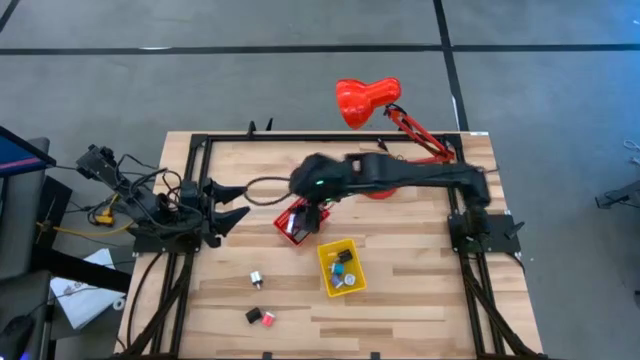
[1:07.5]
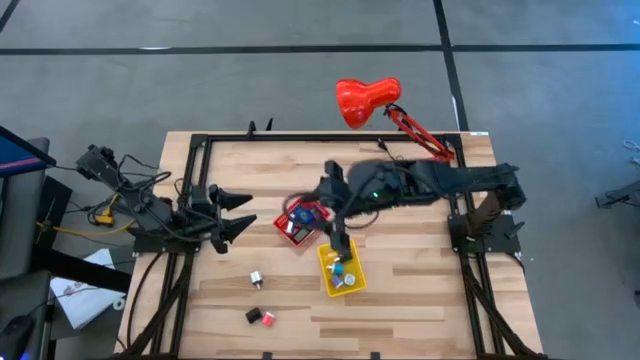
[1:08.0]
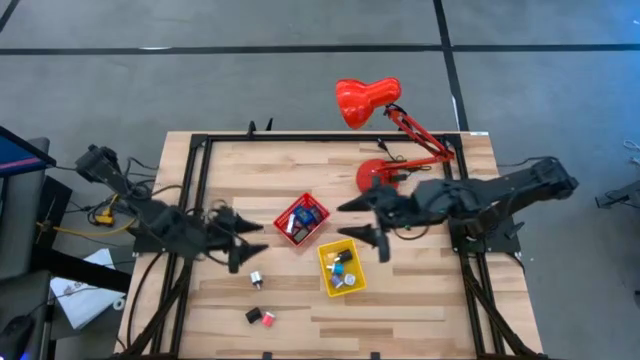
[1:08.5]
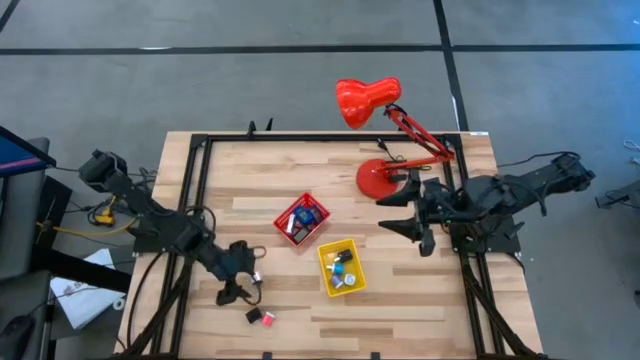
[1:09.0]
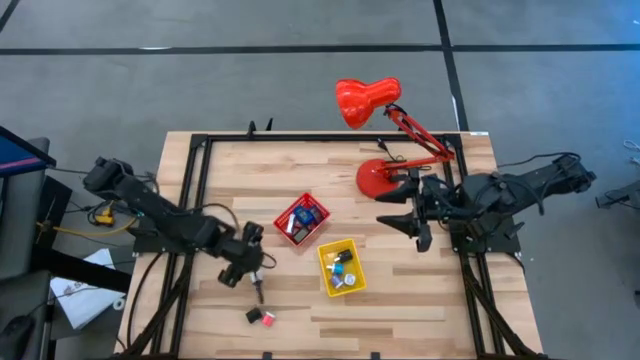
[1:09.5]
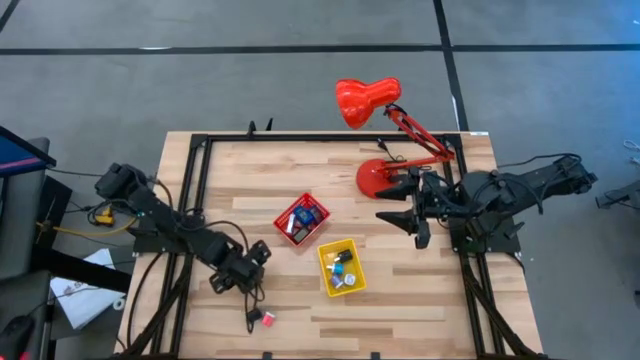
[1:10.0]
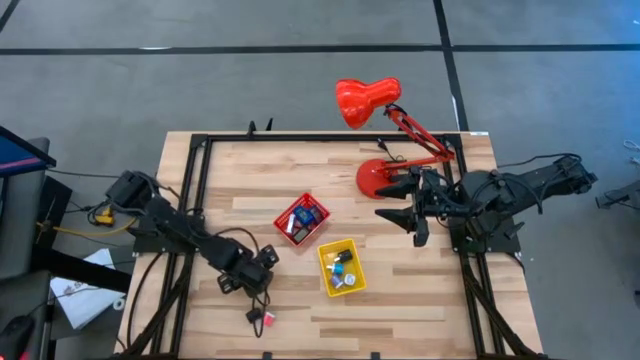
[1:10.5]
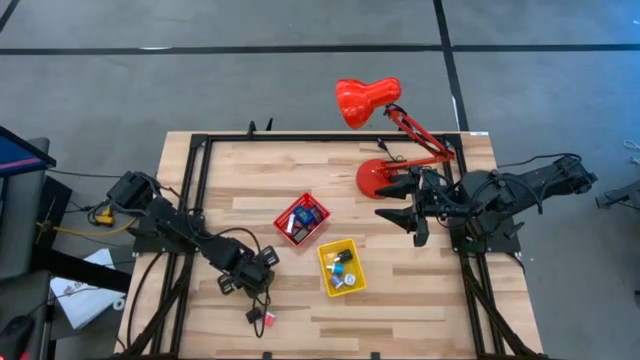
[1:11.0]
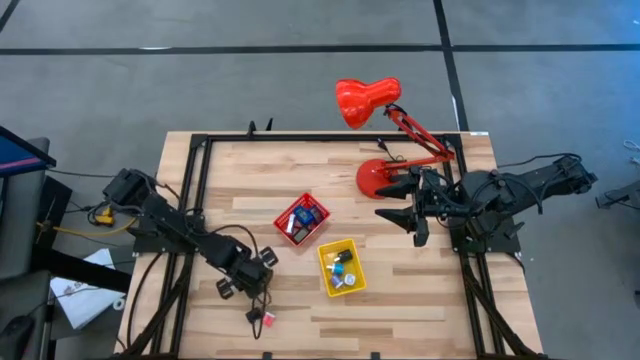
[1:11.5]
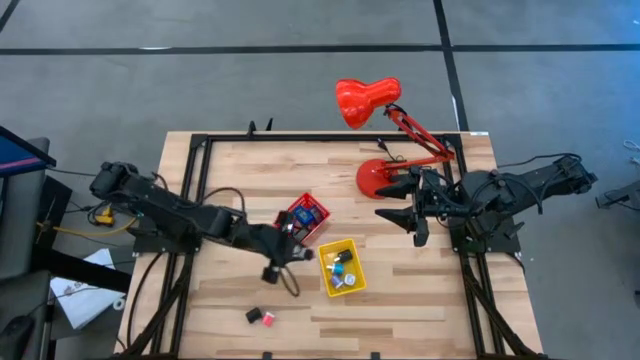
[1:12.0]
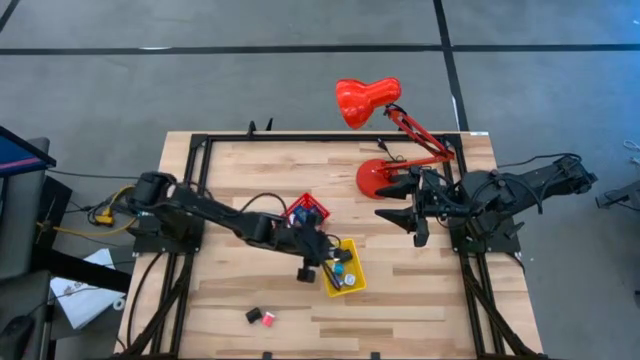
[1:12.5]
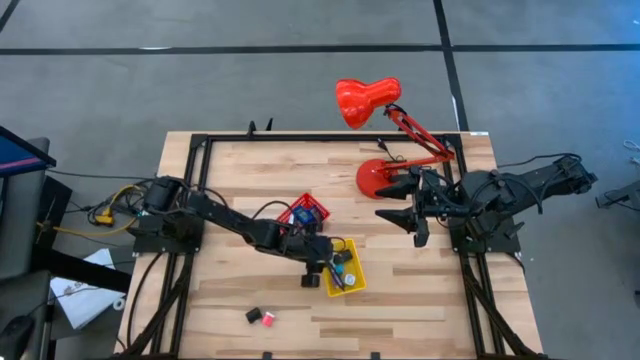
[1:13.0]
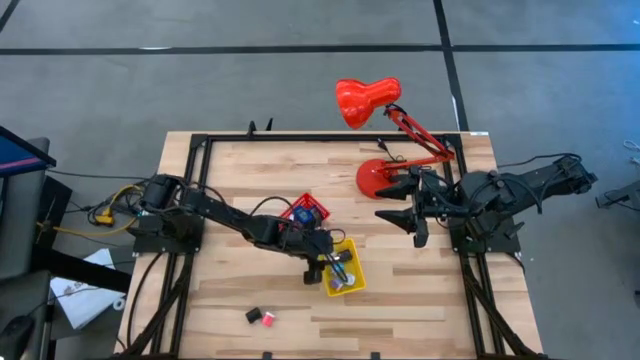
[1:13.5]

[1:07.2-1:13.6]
Task: Pick & Place Office items
Put the white charger adapter into the yellow basket

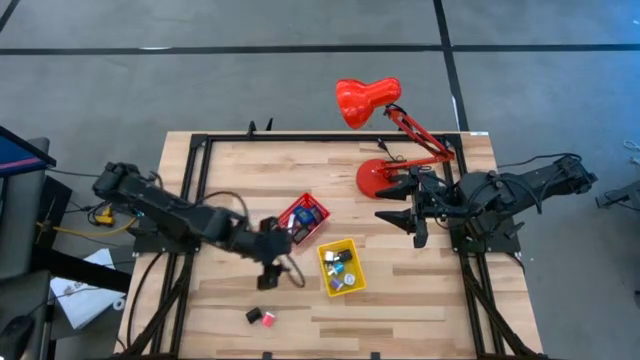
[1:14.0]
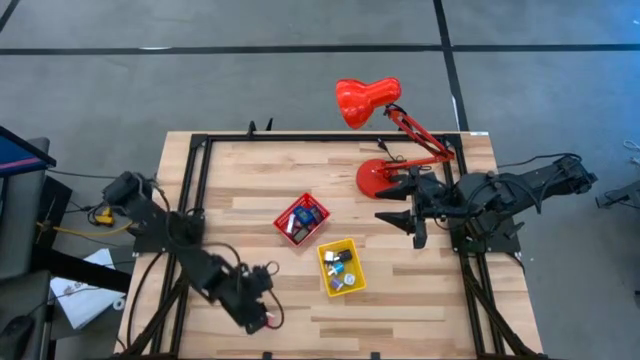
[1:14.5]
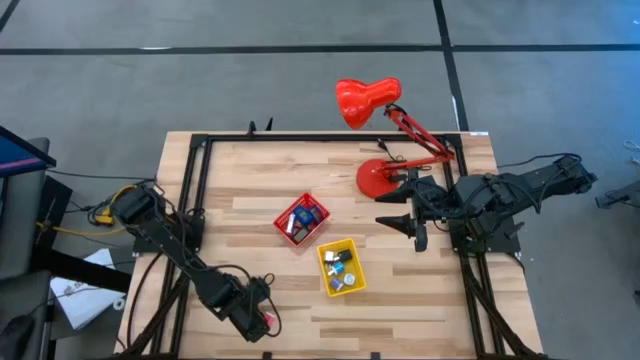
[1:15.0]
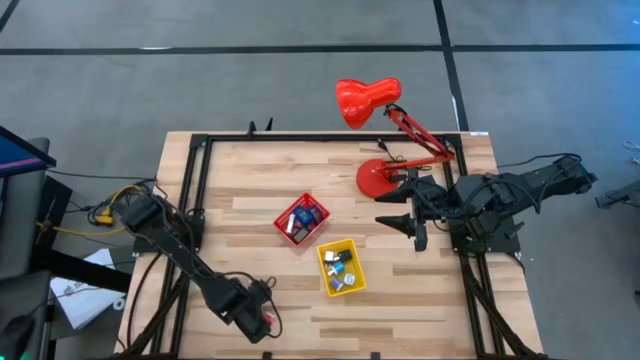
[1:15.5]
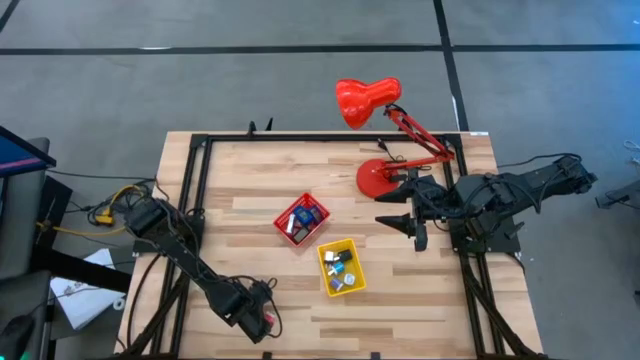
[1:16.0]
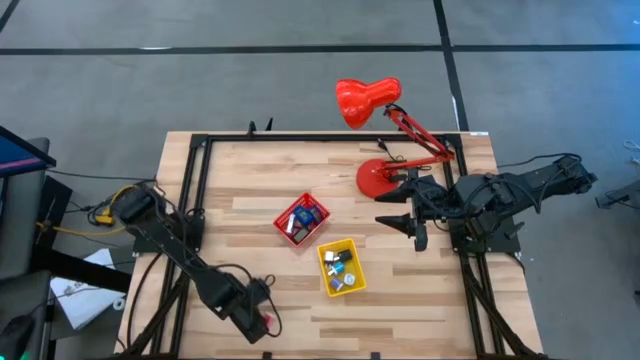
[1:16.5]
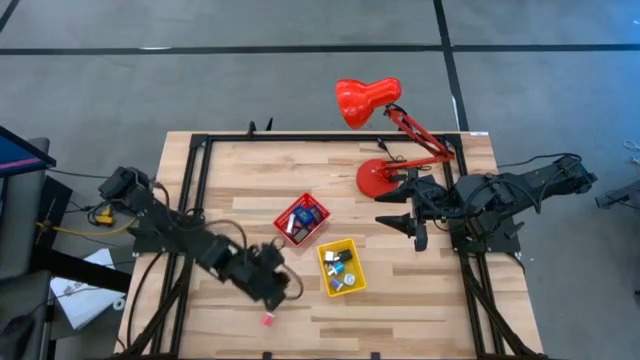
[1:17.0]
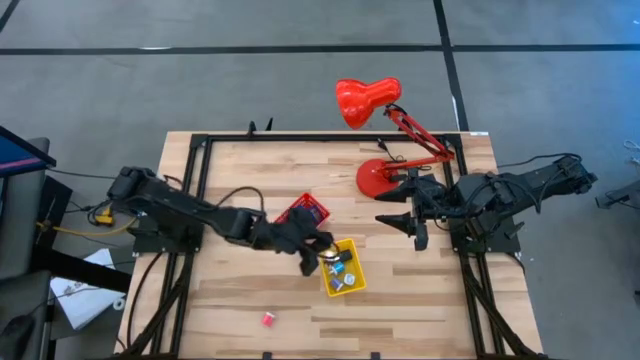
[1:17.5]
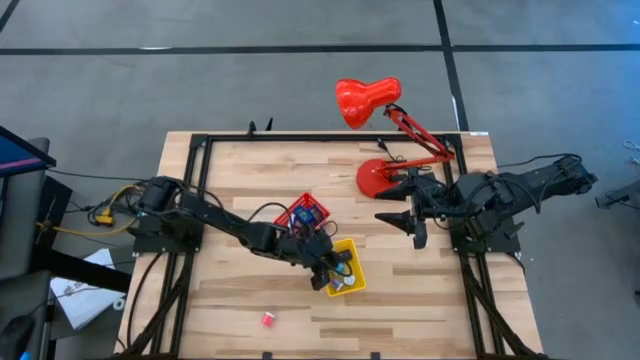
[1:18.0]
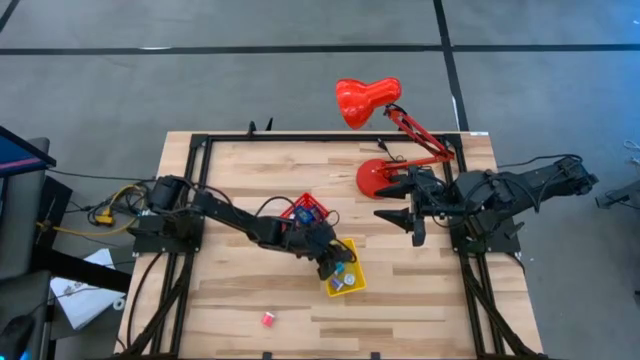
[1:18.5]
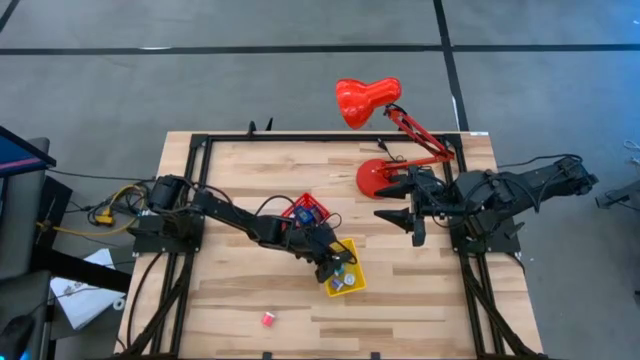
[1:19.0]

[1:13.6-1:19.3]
Put the black charger adapter into the yellow basket

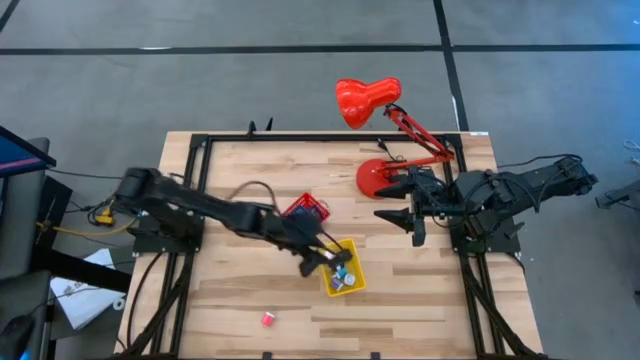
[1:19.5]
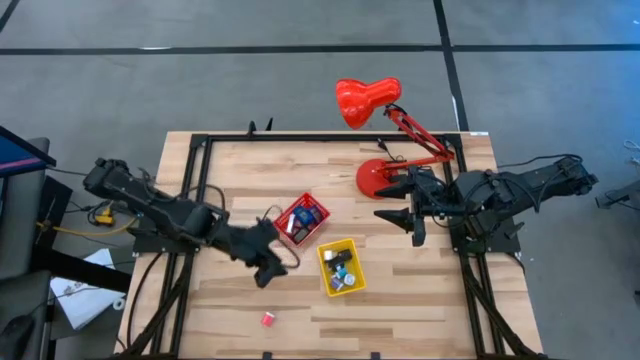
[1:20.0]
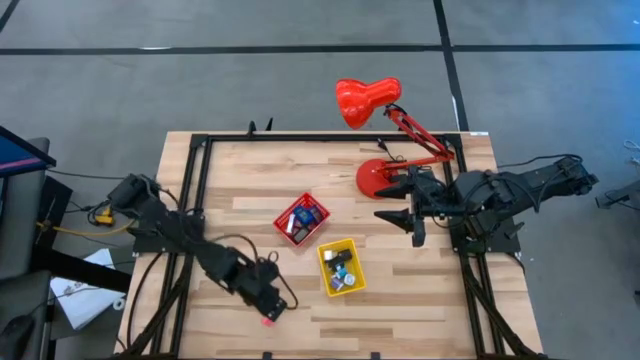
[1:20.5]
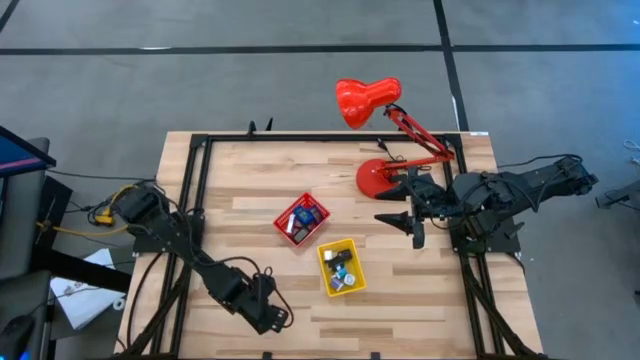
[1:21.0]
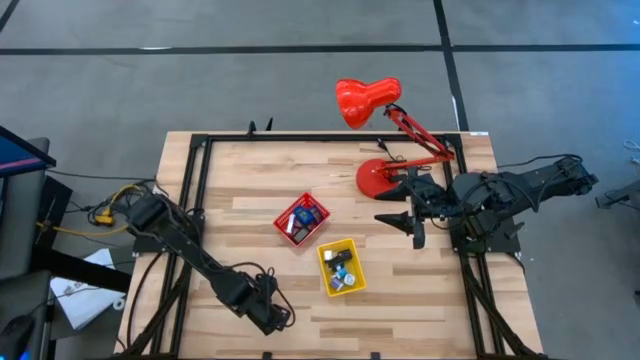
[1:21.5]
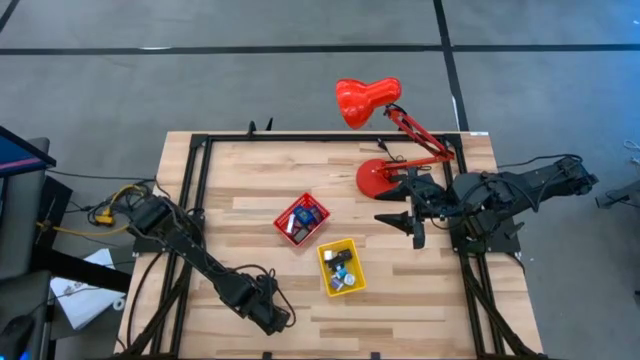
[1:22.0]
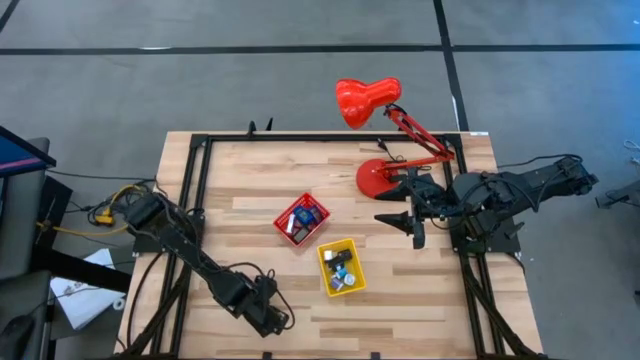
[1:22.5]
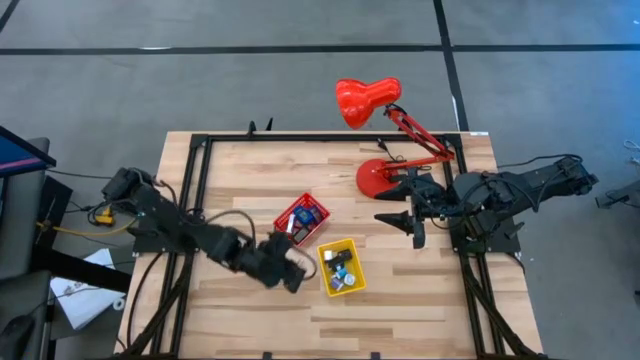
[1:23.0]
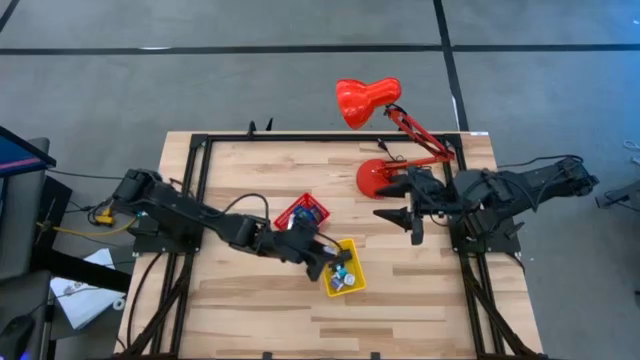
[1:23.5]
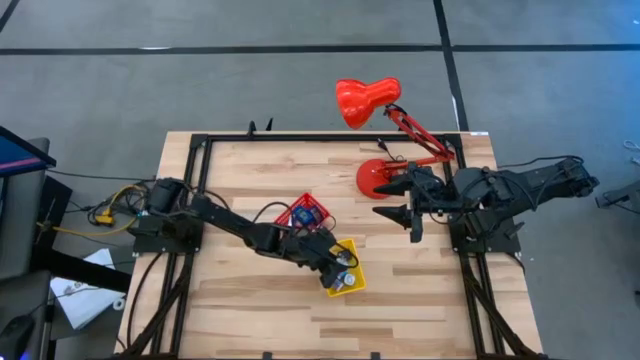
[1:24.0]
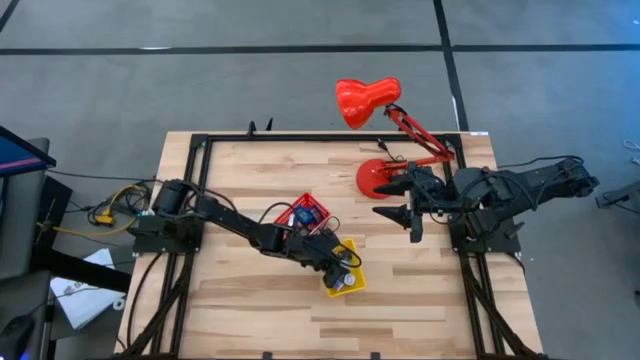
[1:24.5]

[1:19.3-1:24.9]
Put the pink charger adapter into the yellow basket

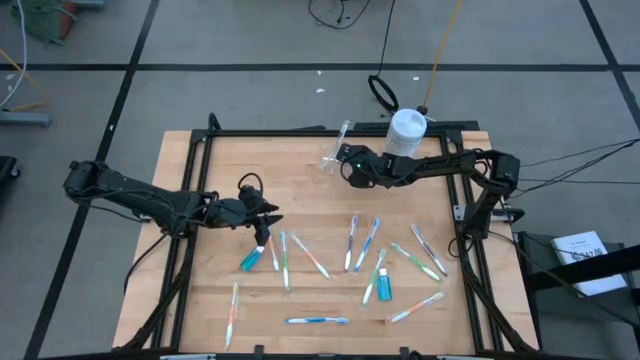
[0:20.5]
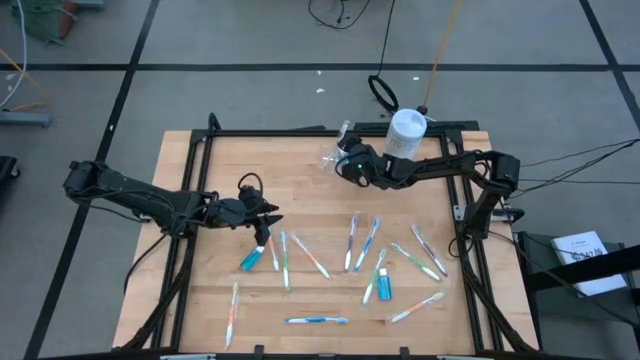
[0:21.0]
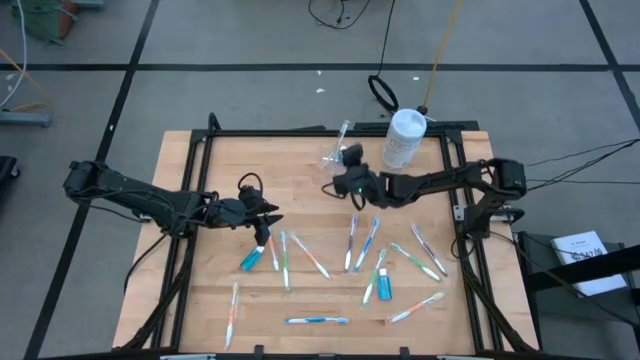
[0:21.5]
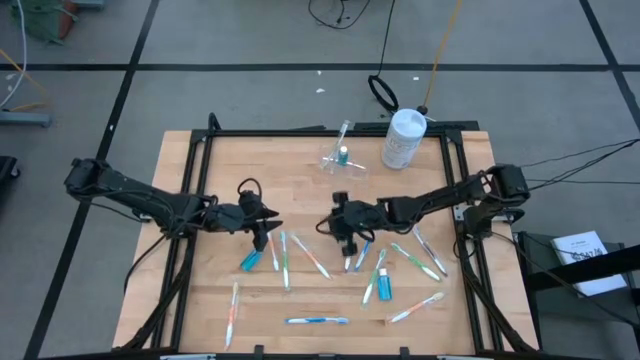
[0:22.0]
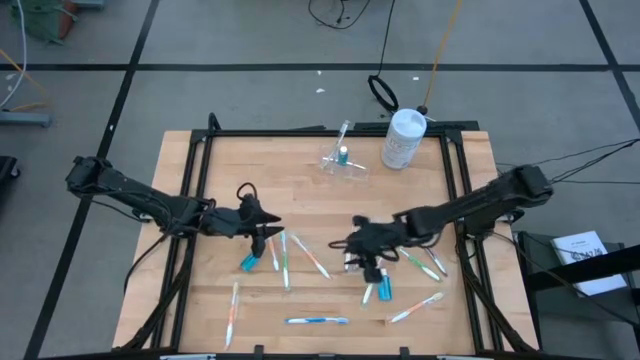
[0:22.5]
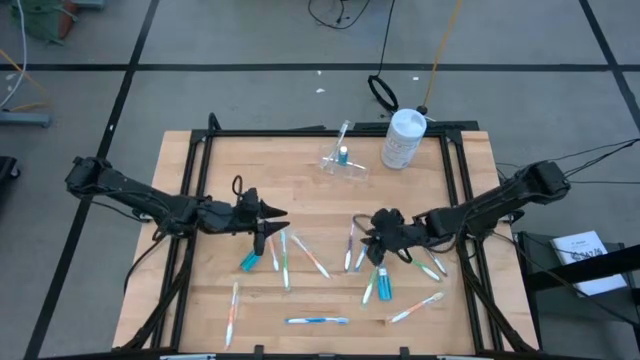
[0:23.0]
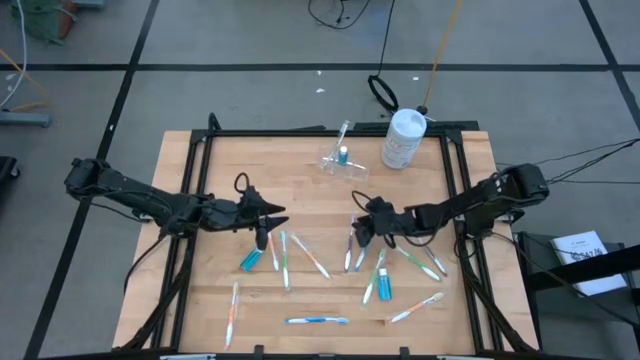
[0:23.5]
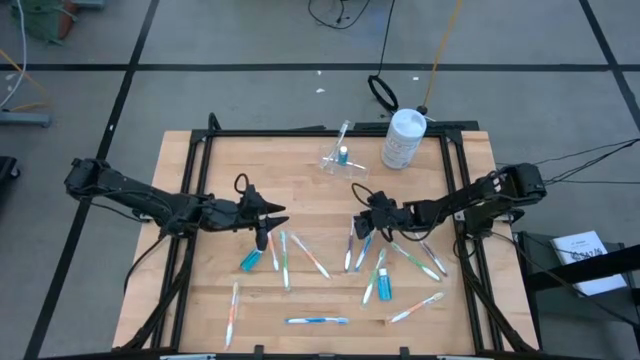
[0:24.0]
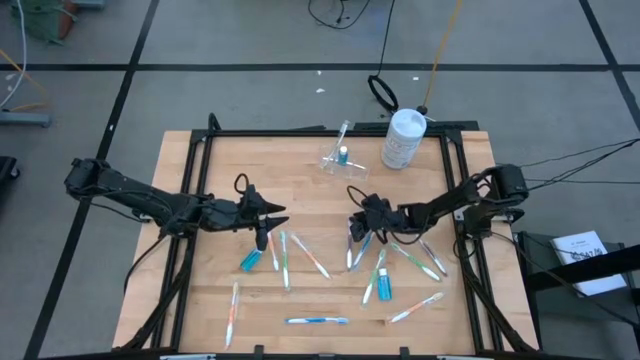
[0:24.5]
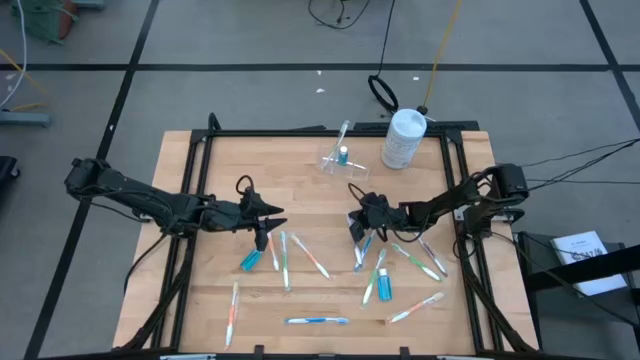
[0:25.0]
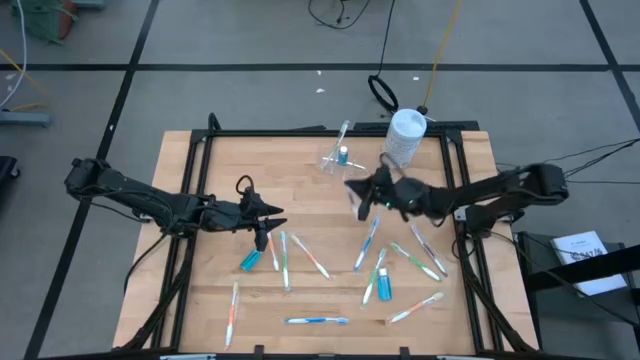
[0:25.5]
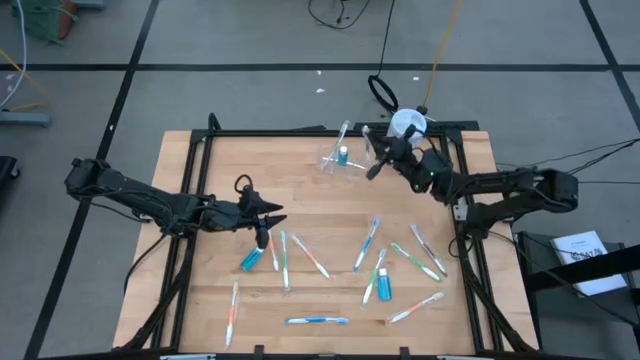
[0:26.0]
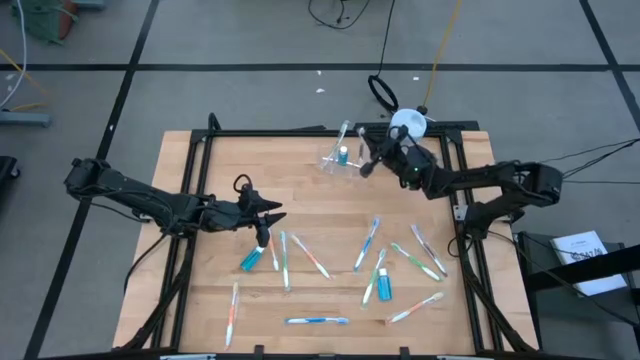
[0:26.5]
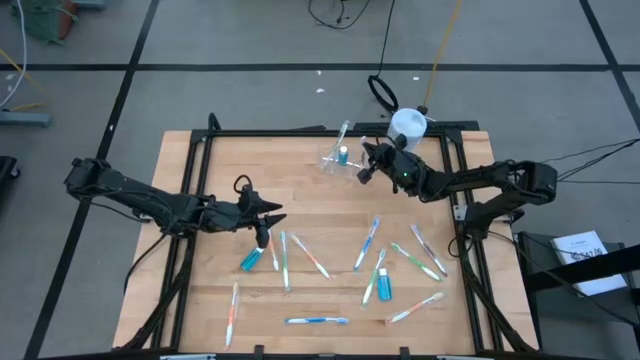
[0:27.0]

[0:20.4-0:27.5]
Task: Pick & Place toothbrushing station
Put the purple toothbrush into the transparent organizer
